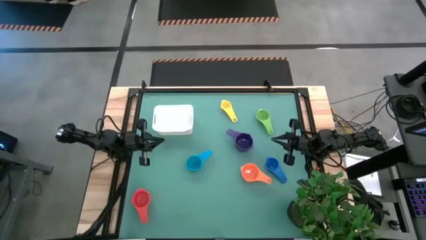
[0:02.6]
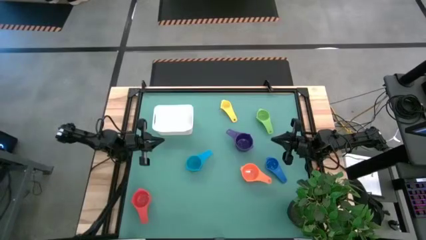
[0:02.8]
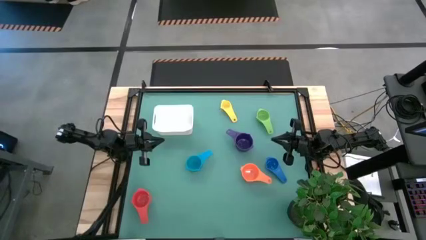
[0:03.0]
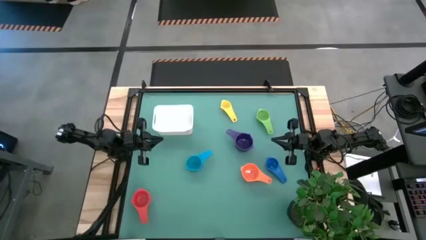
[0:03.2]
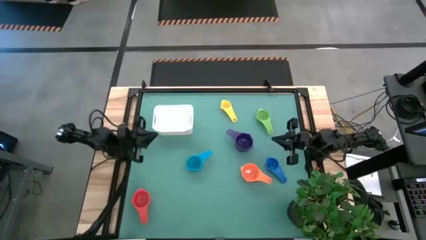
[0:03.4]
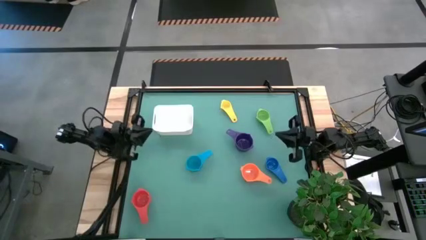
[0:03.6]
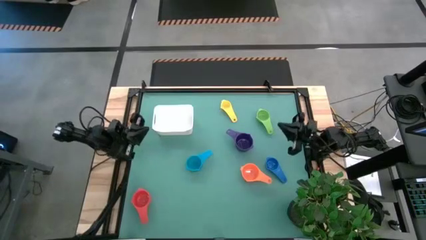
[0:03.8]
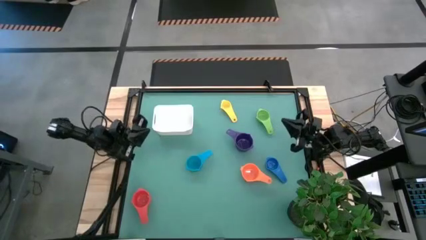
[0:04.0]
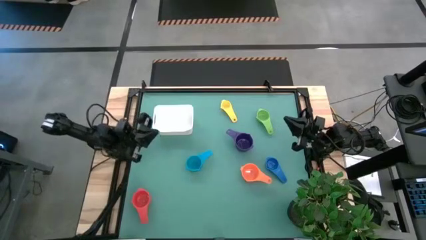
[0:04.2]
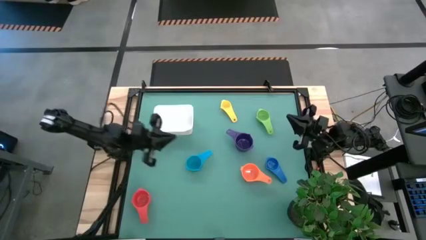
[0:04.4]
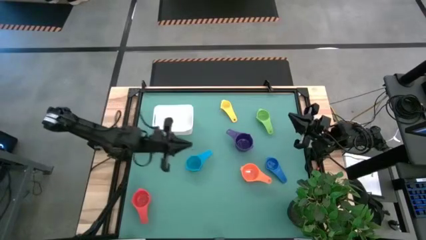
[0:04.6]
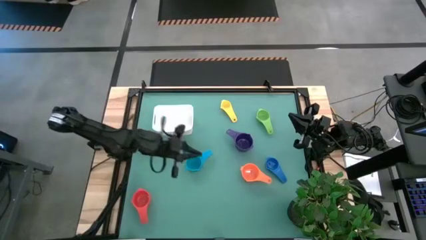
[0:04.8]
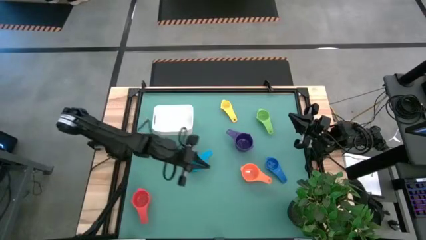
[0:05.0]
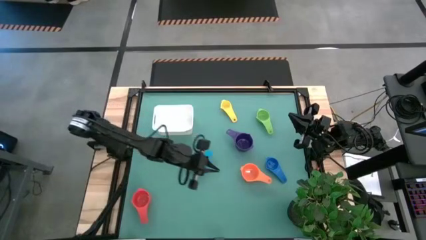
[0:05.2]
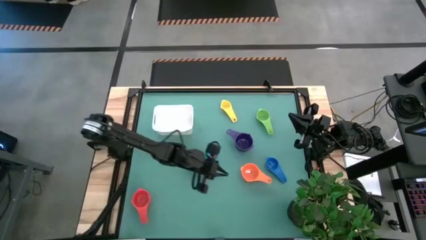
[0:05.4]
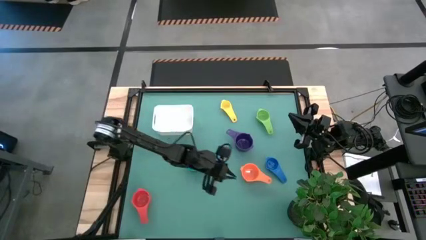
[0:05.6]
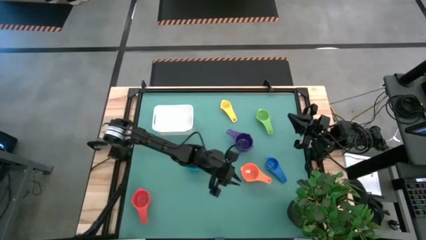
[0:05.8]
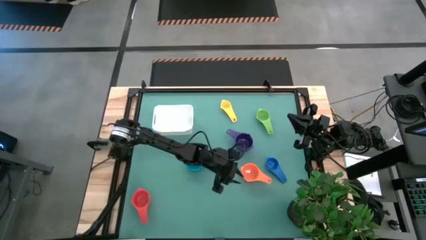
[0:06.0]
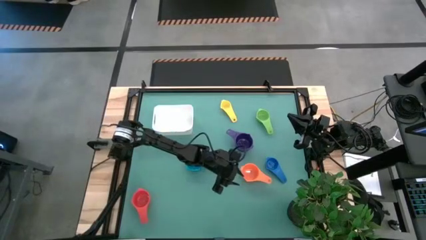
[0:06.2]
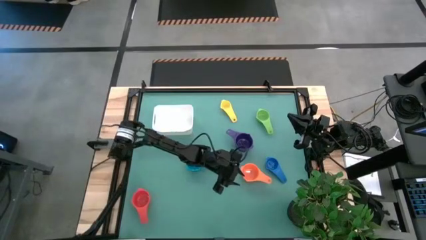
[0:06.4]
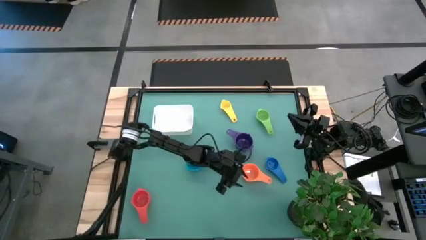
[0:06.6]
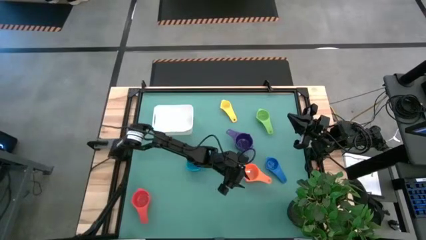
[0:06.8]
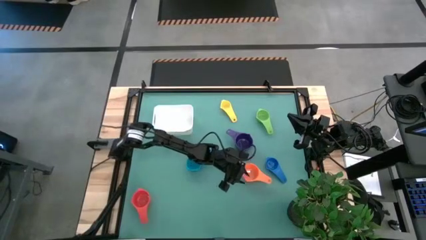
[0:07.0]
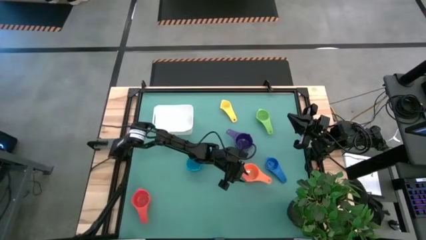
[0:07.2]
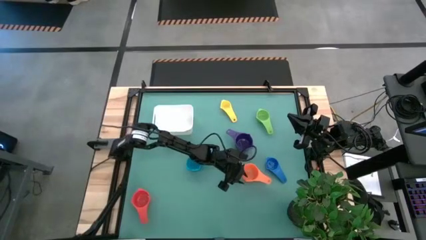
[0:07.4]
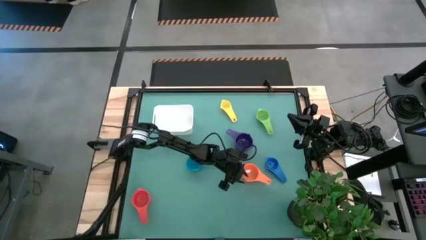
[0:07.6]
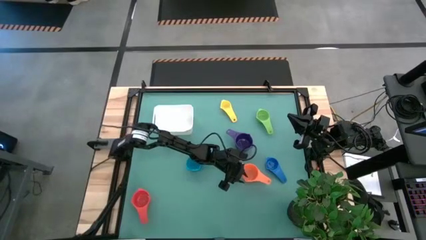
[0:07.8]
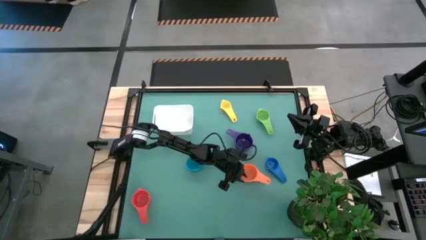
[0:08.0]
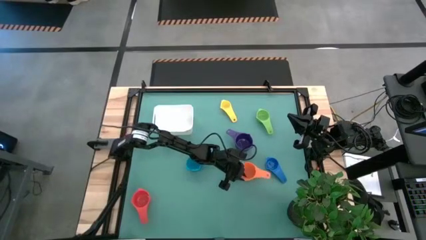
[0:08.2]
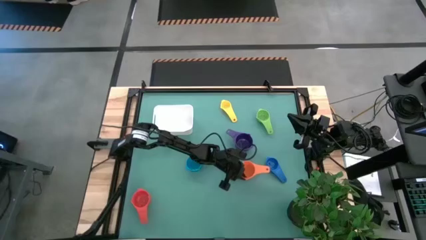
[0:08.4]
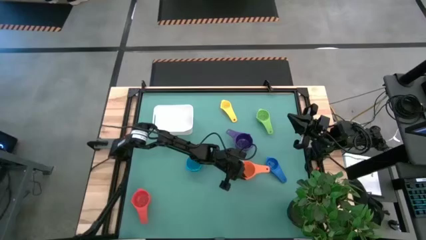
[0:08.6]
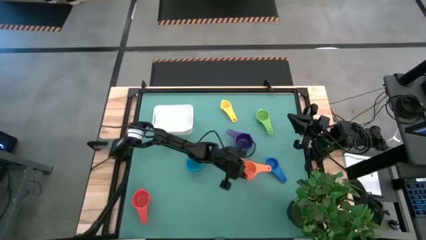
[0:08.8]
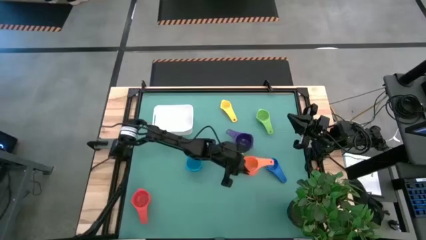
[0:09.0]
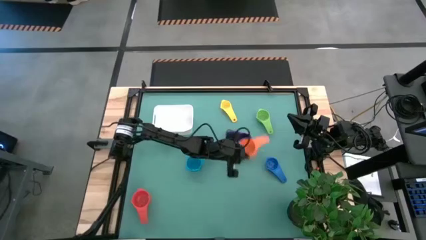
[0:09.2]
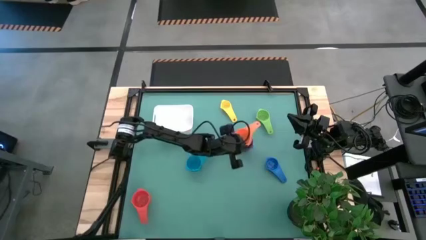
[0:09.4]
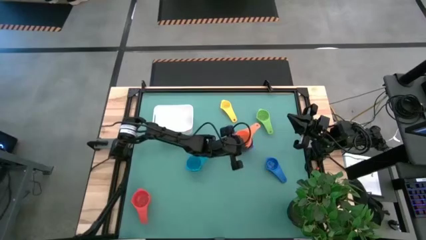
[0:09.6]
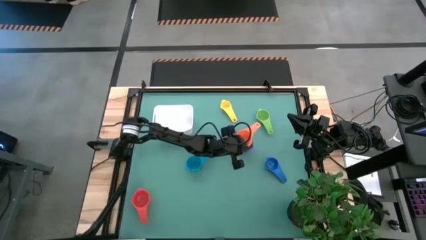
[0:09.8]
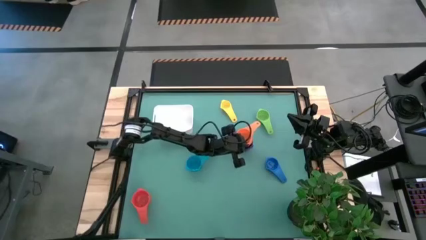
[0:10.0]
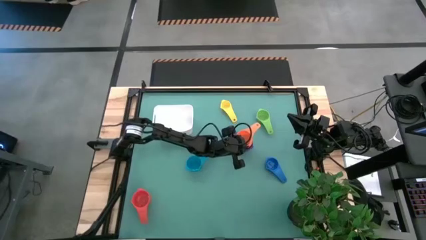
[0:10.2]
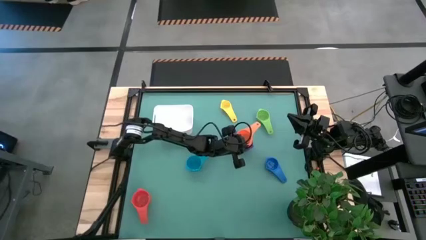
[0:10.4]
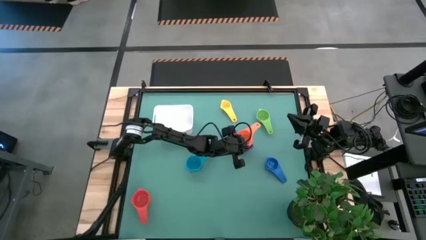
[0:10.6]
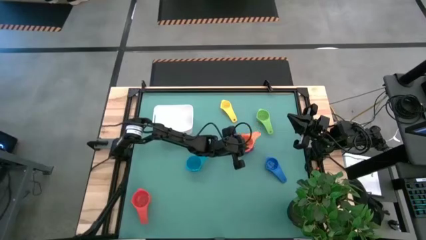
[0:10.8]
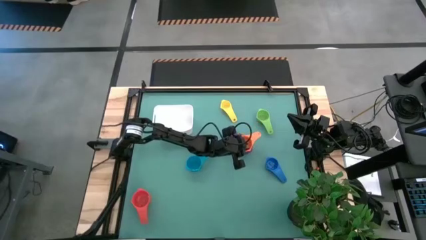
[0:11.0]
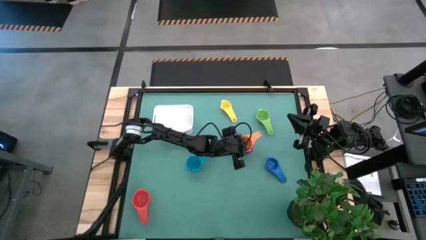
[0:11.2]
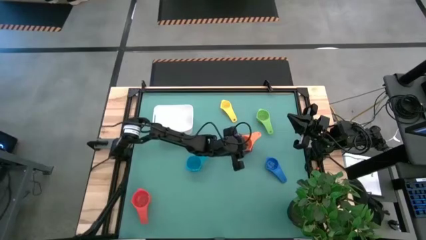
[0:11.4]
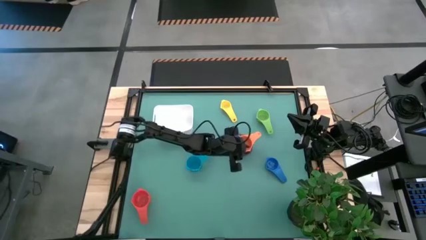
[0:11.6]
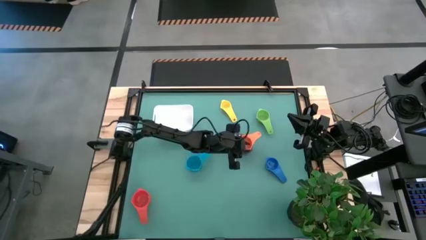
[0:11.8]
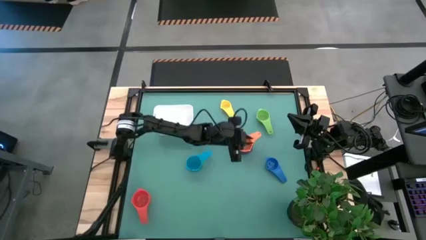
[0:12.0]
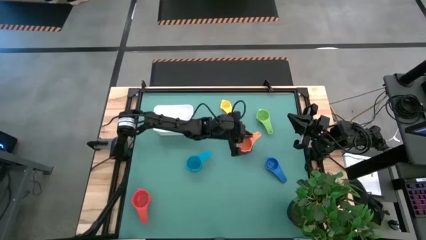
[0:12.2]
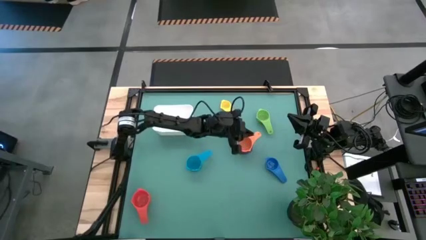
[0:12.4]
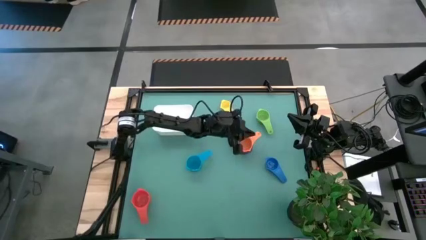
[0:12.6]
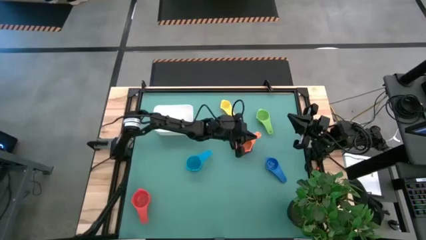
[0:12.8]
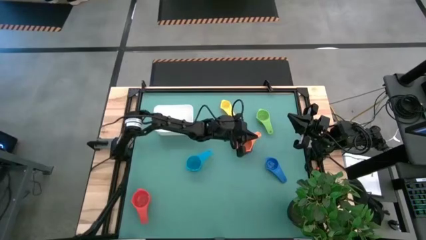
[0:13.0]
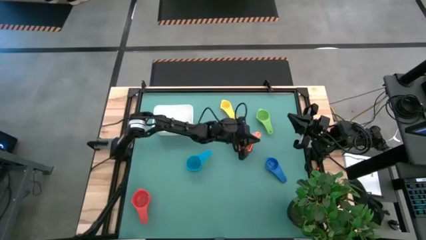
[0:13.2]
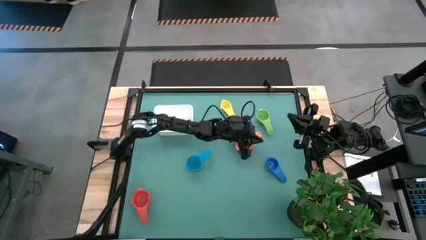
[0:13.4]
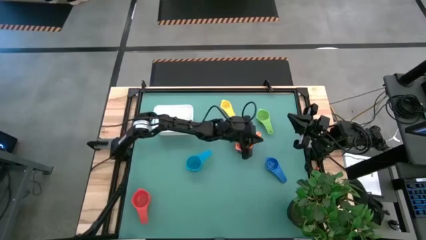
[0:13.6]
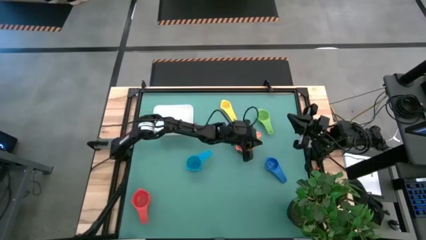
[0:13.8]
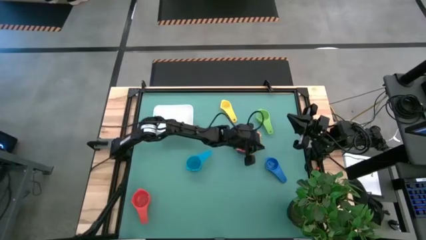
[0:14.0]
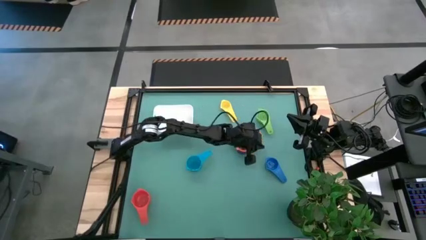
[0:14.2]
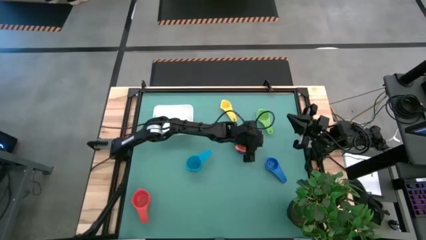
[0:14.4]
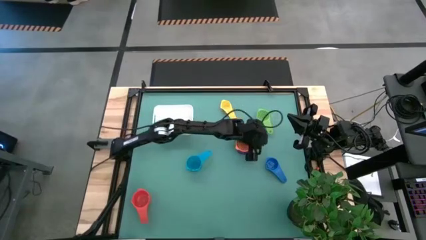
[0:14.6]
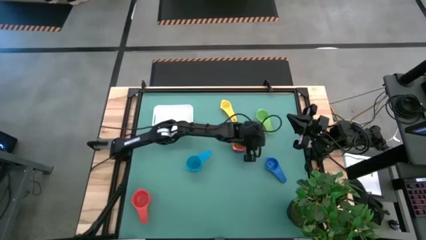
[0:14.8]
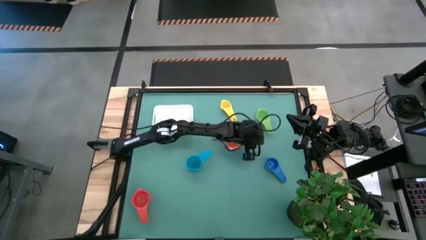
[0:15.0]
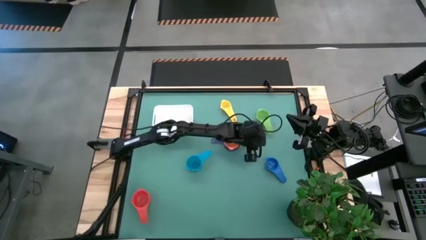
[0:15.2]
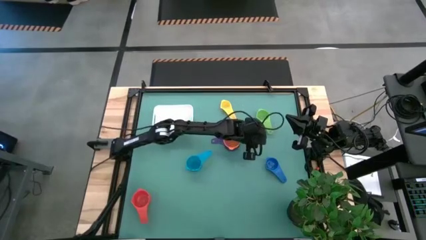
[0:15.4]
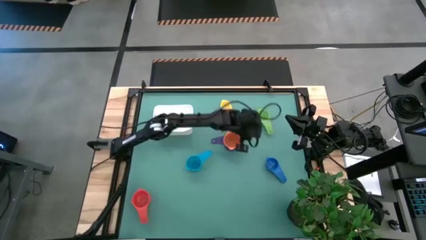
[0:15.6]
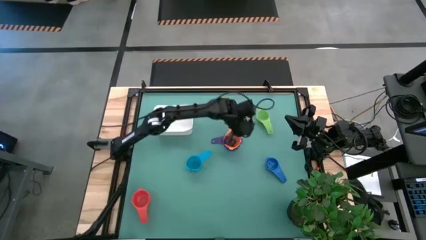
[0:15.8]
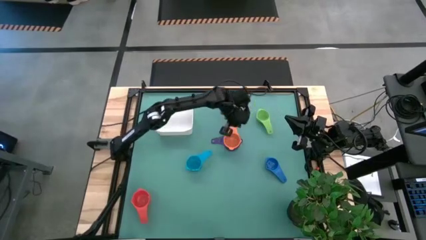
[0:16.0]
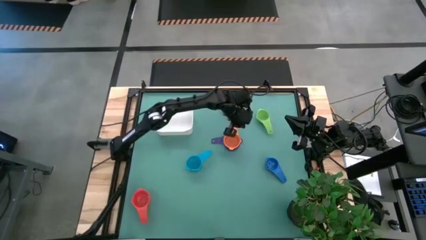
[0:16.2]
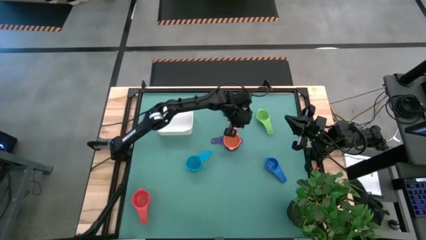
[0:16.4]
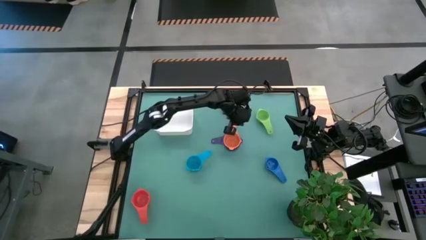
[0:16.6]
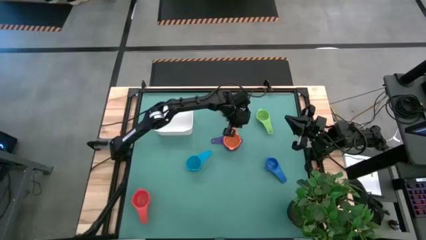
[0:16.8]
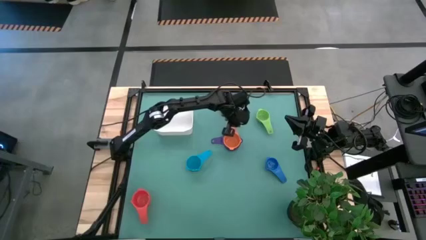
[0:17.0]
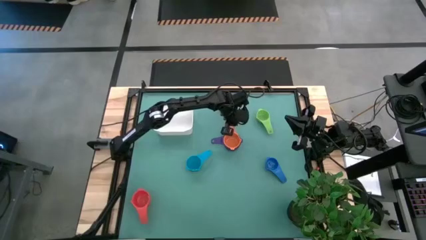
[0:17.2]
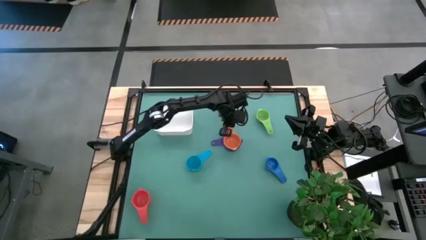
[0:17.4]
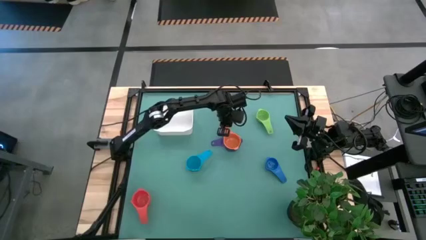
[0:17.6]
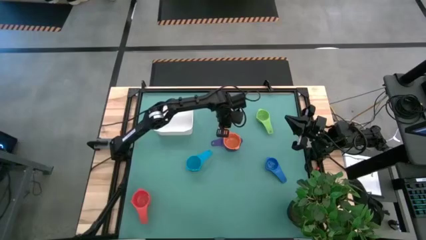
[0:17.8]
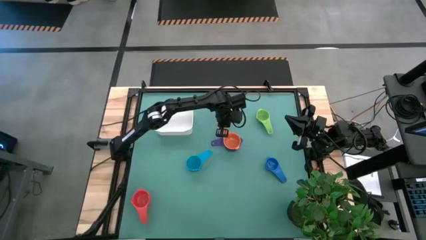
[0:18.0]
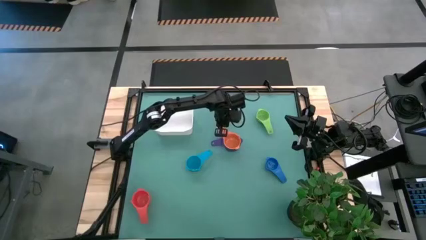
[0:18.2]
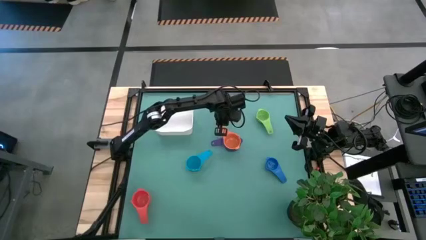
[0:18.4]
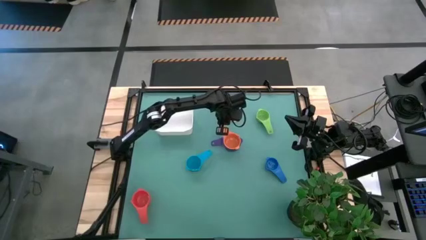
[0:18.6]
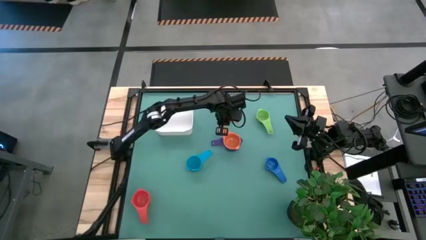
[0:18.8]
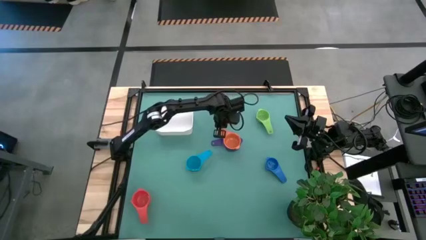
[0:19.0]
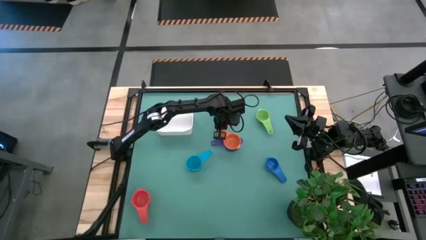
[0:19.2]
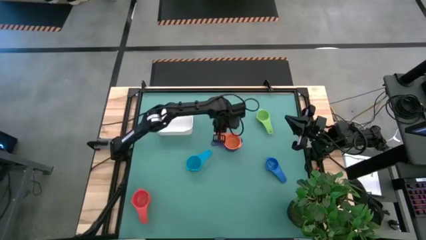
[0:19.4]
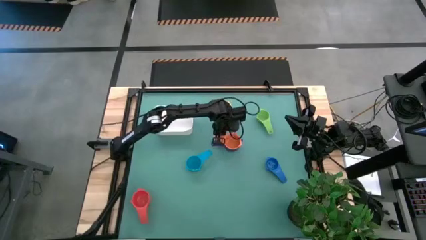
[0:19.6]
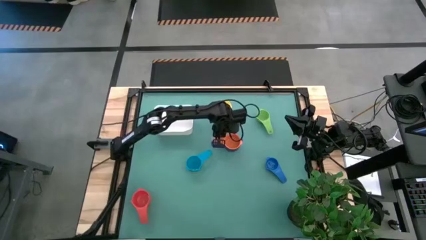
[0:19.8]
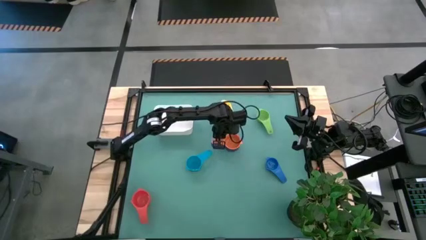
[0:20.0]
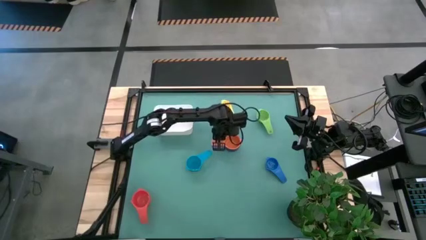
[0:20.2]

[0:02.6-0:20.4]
Task: Nest measuring cups in basket
Stack the orange measuring cup on top of the violet measuring cup
